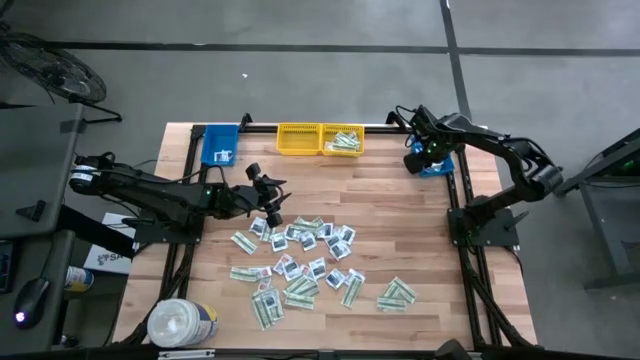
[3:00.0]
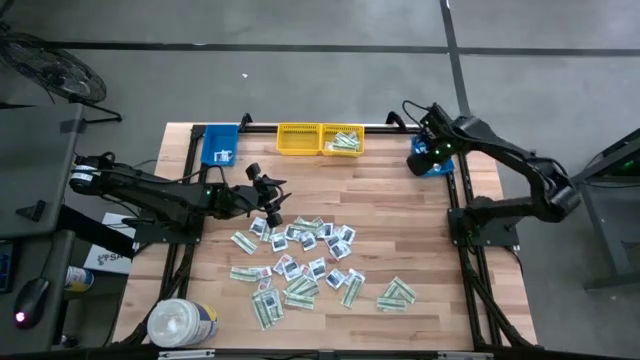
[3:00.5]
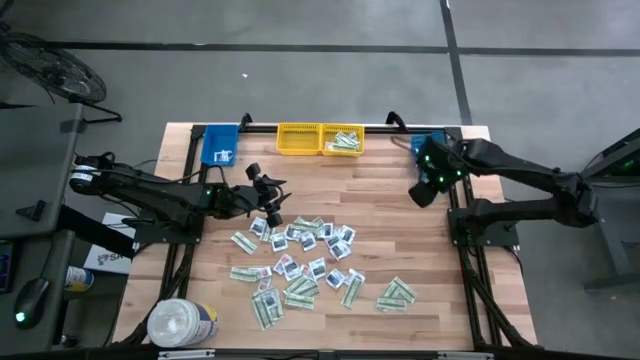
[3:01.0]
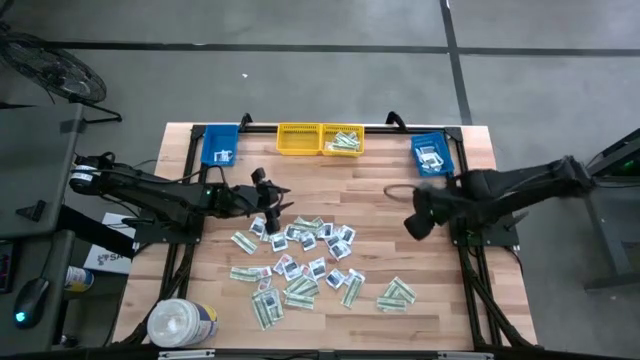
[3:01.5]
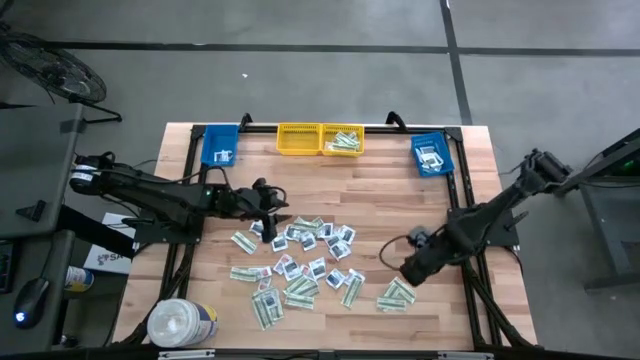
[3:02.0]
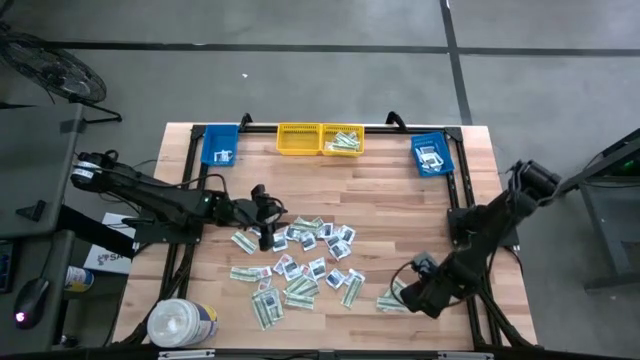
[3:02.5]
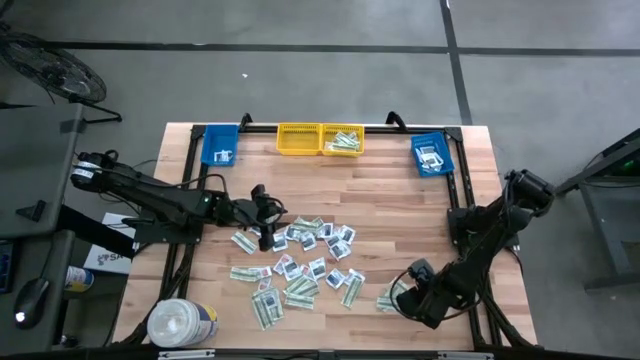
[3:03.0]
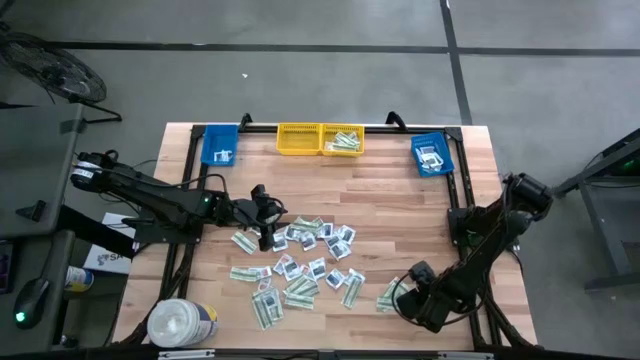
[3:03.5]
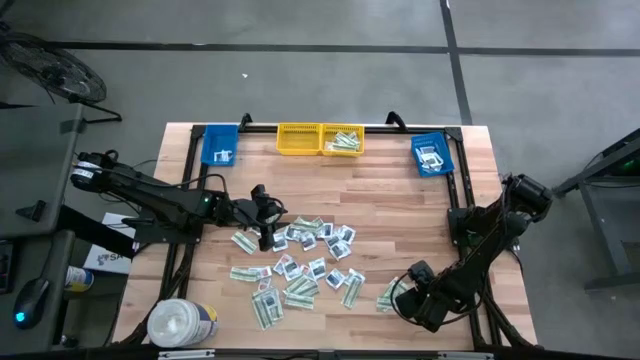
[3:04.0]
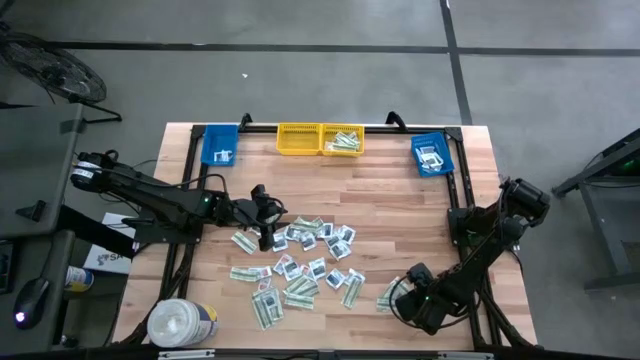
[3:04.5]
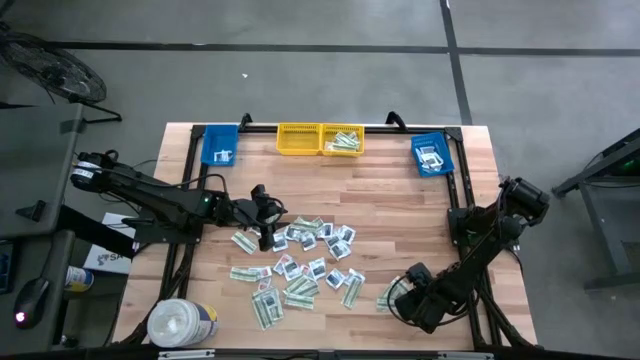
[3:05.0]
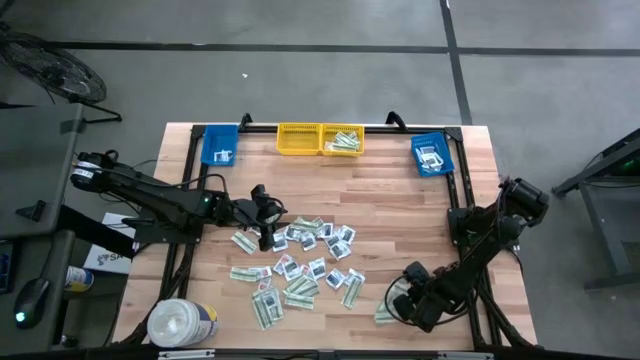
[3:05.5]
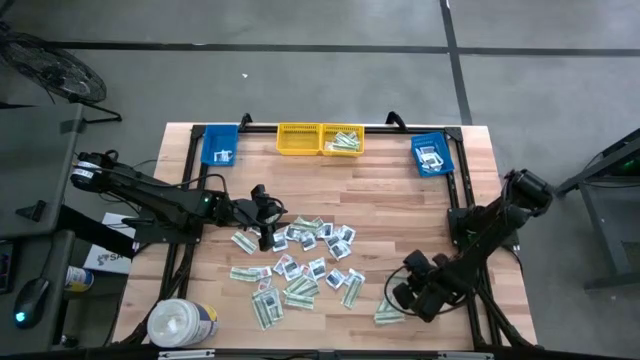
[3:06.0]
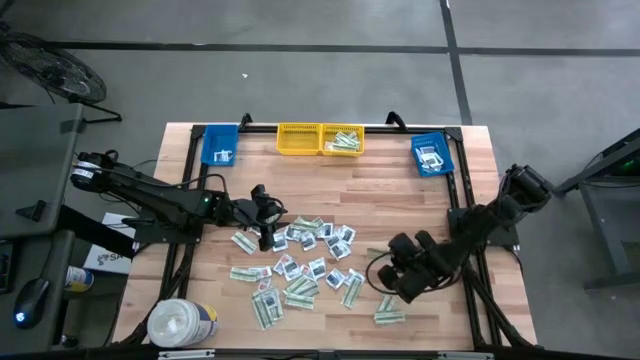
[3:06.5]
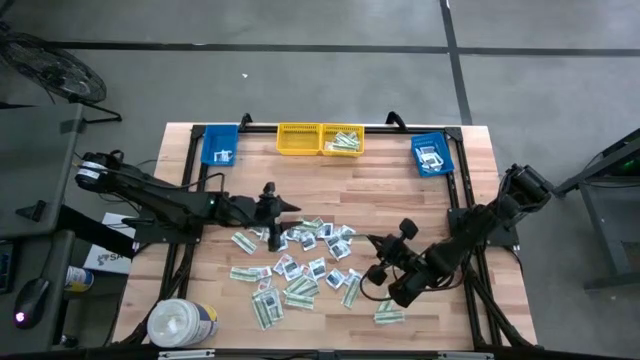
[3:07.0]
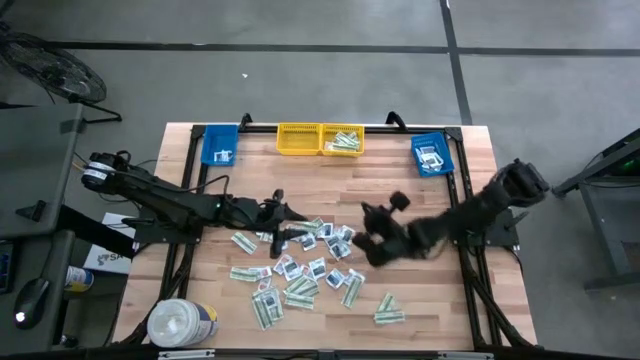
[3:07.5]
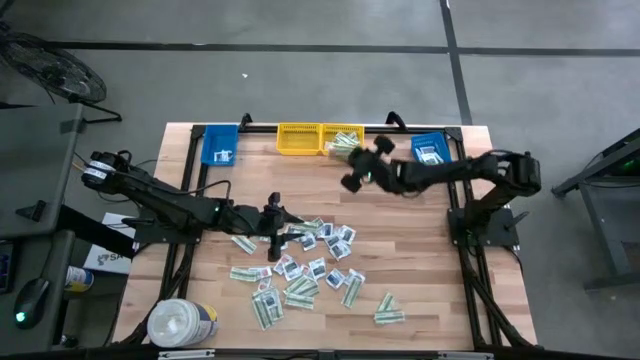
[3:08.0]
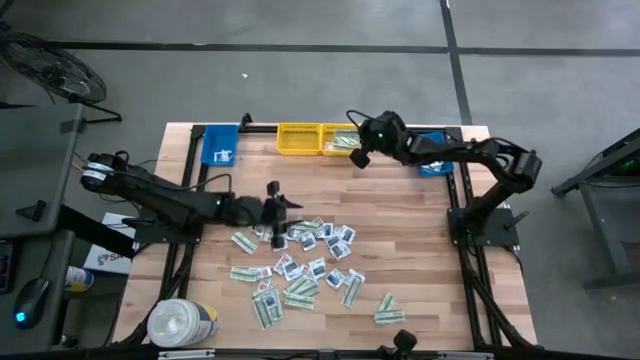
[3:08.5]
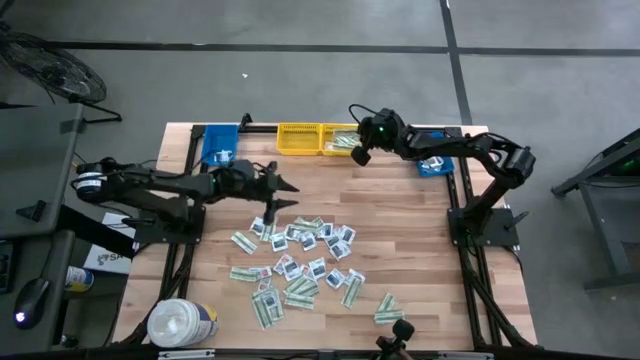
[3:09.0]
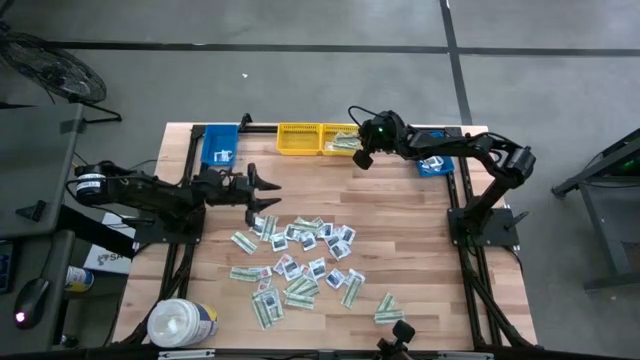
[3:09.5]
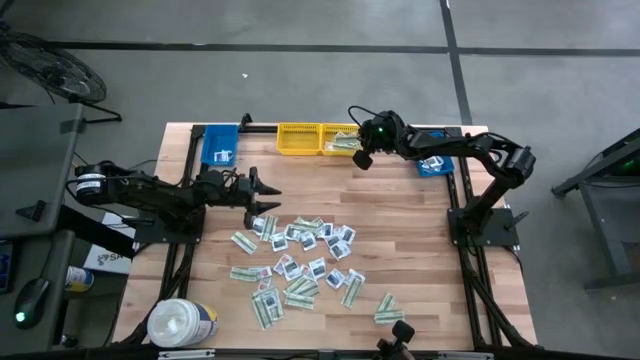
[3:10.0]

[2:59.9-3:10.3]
Task: Pick & Place First Aid Supplies
Put the green bandage pack into the right yellow bin

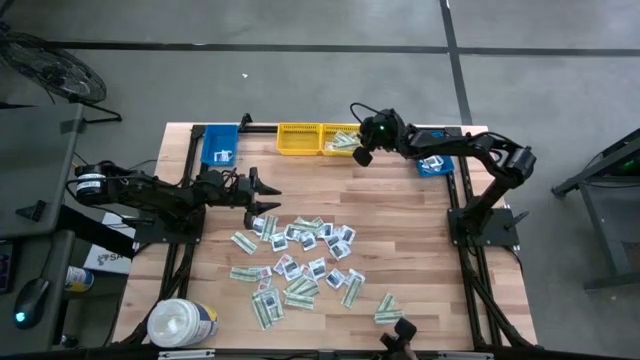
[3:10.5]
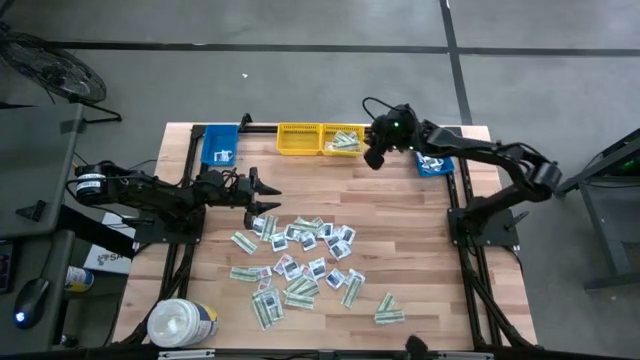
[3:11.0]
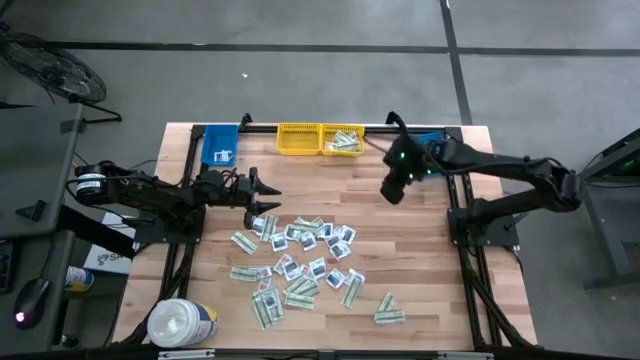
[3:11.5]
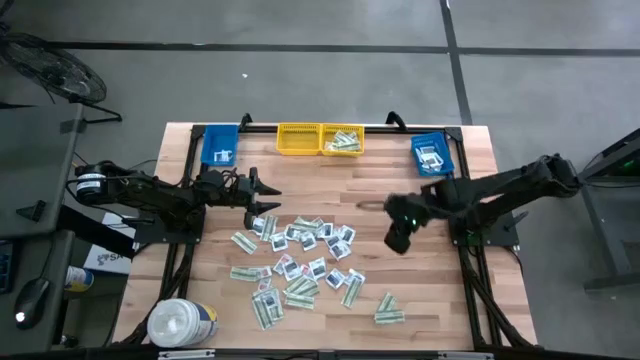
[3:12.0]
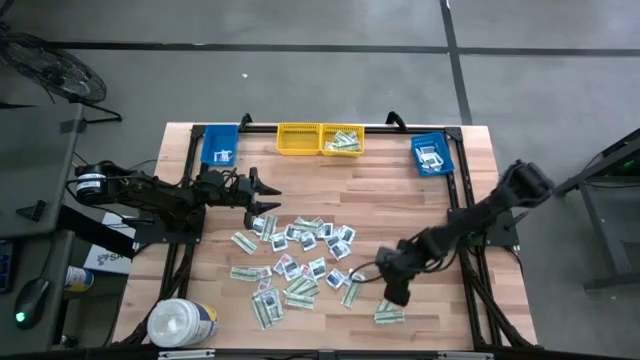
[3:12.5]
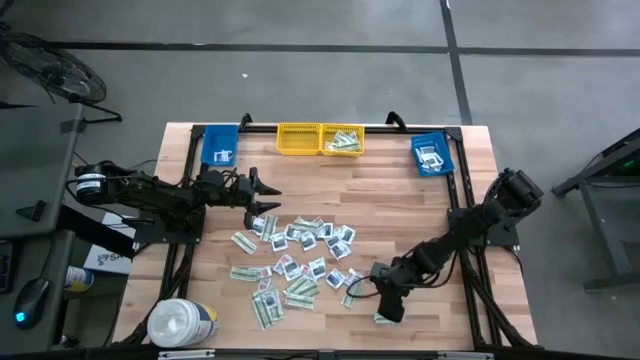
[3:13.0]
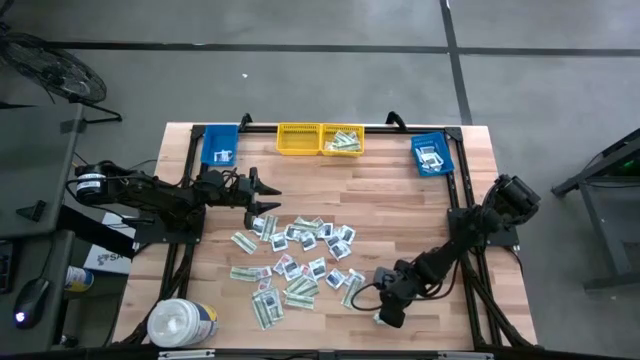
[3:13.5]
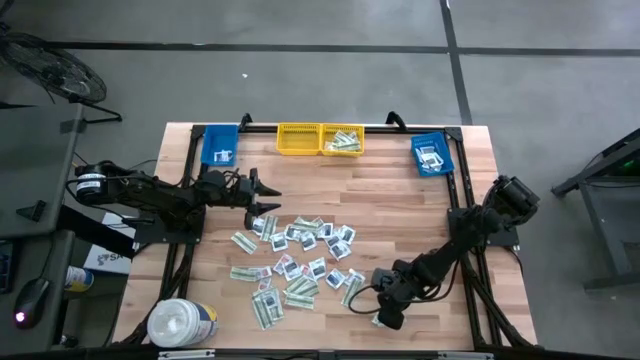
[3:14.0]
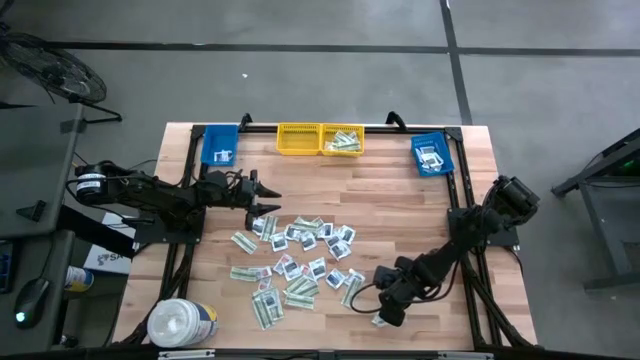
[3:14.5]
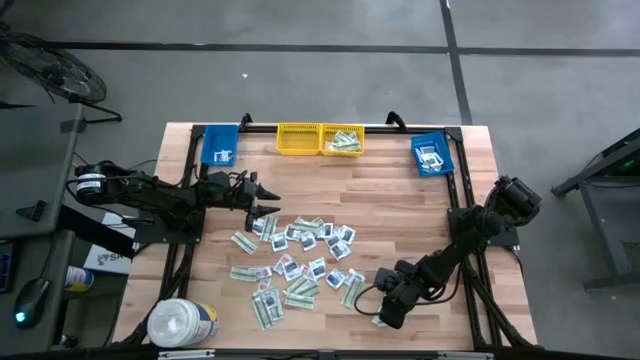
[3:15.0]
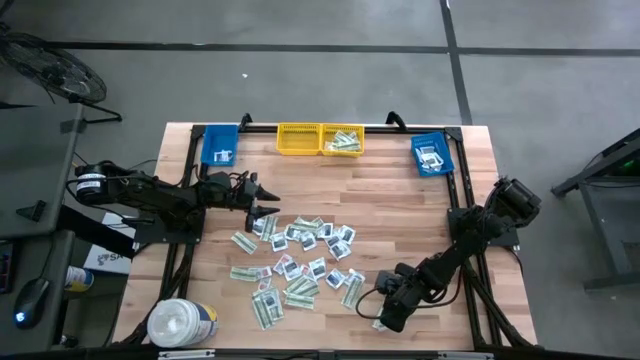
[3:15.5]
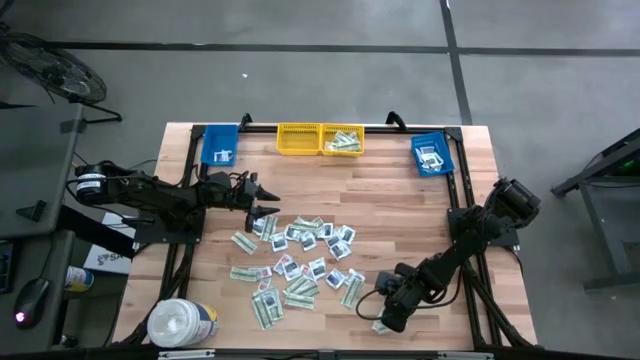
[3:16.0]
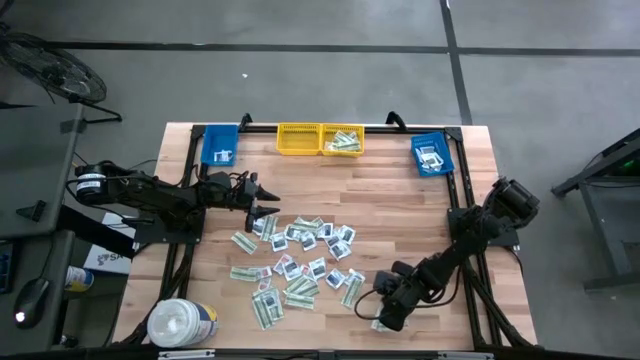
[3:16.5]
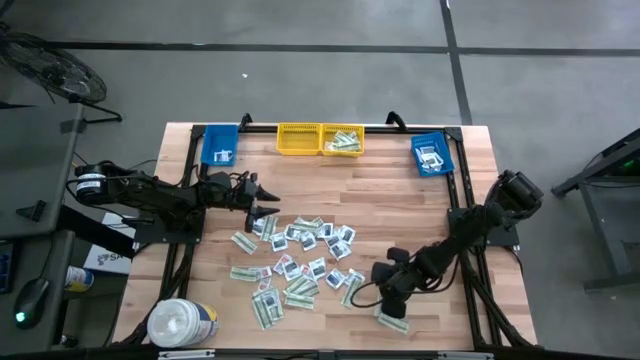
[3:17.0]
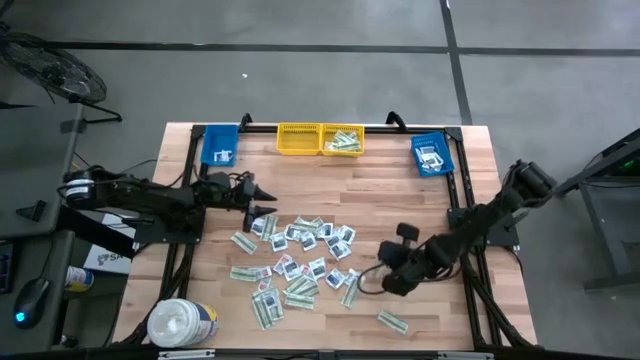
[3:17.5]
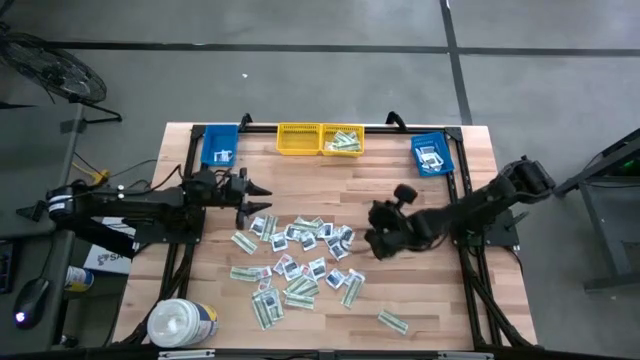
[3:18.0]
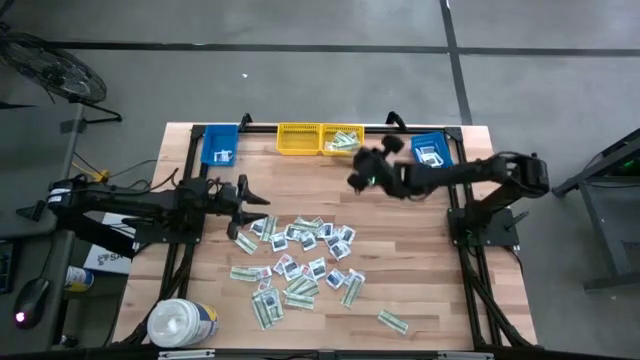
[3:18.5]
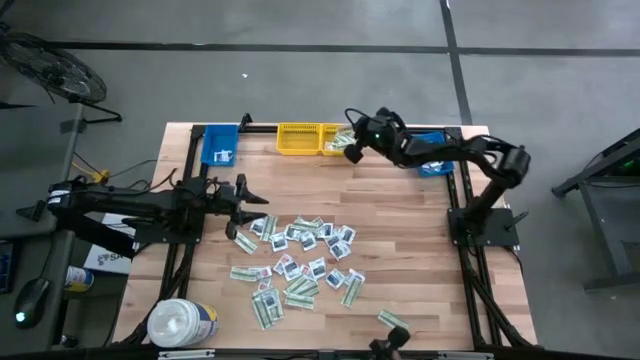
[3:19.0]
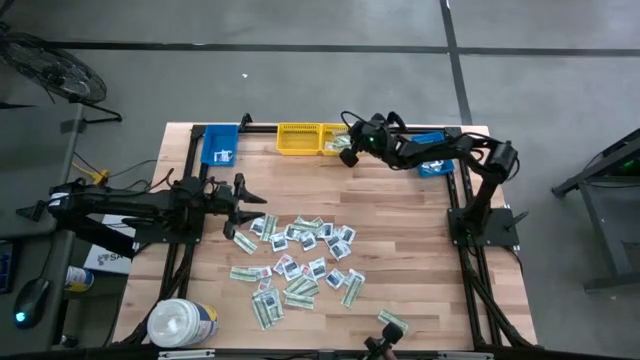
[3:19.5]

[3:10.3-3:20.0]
Put the green bandage pack into the right yellow bin
